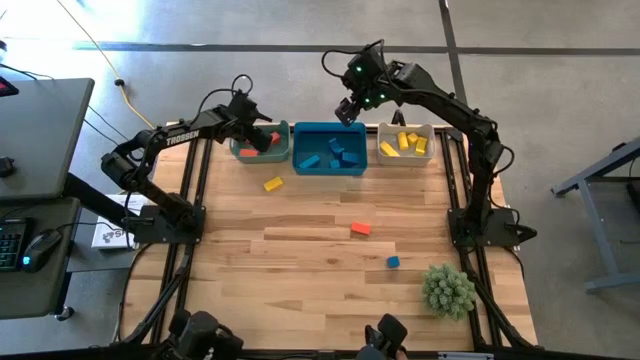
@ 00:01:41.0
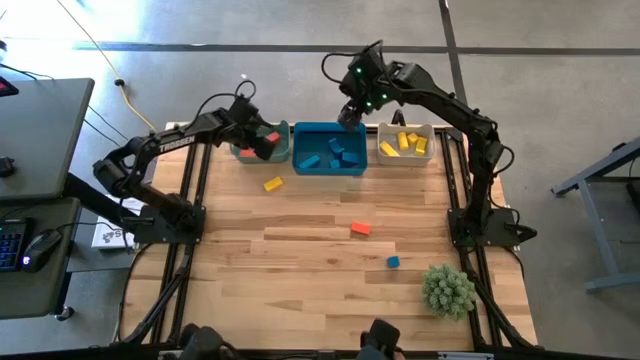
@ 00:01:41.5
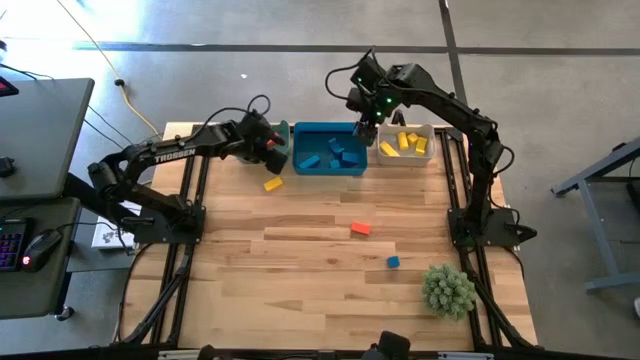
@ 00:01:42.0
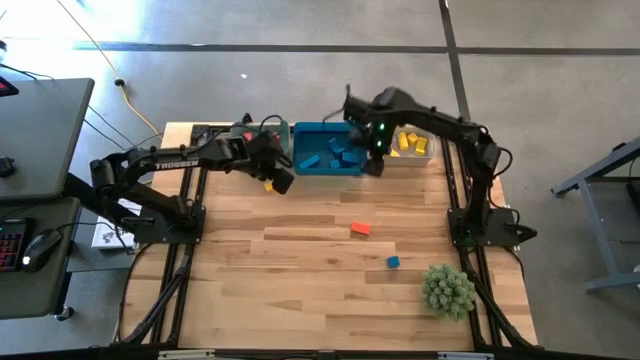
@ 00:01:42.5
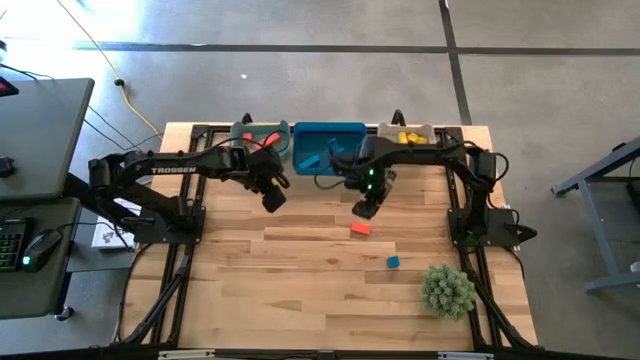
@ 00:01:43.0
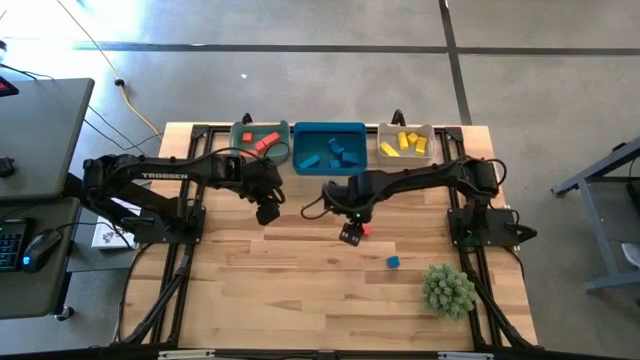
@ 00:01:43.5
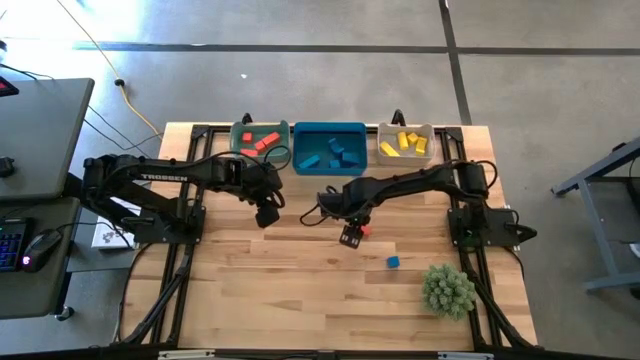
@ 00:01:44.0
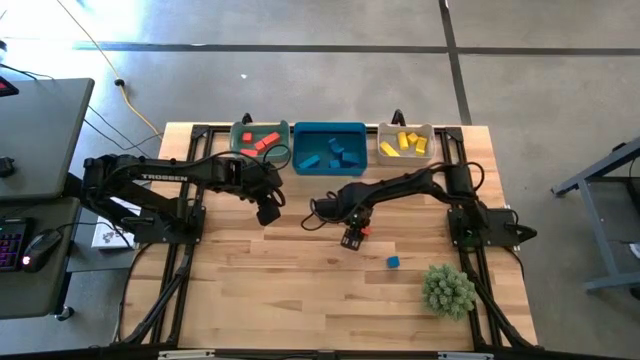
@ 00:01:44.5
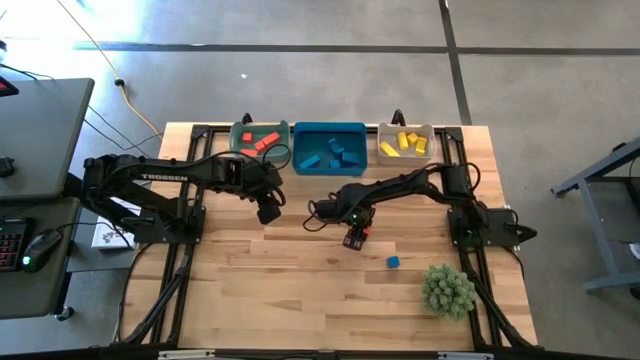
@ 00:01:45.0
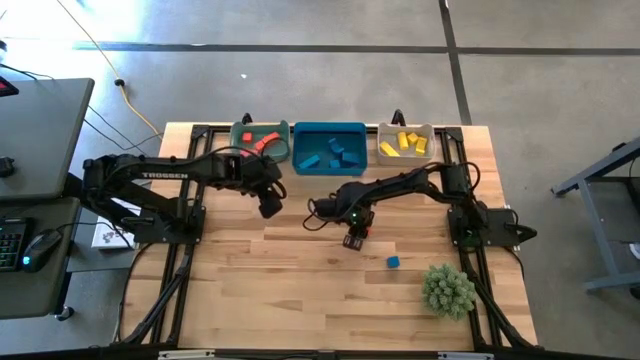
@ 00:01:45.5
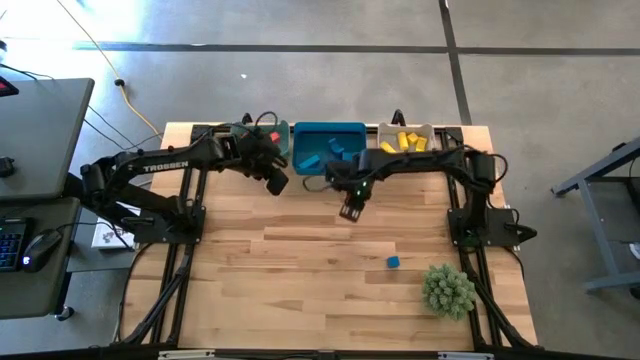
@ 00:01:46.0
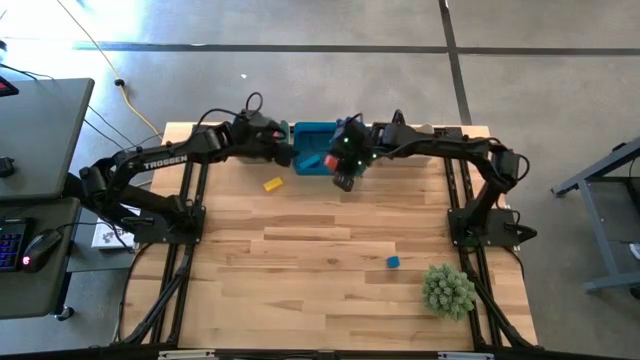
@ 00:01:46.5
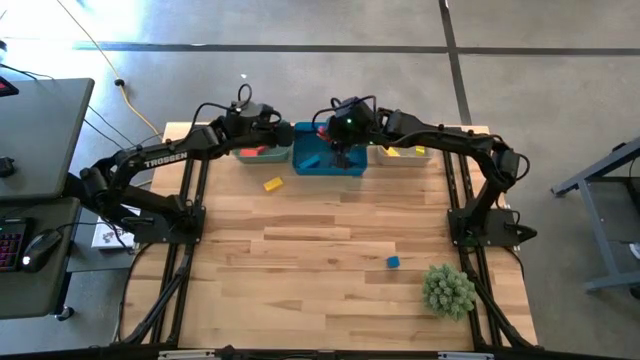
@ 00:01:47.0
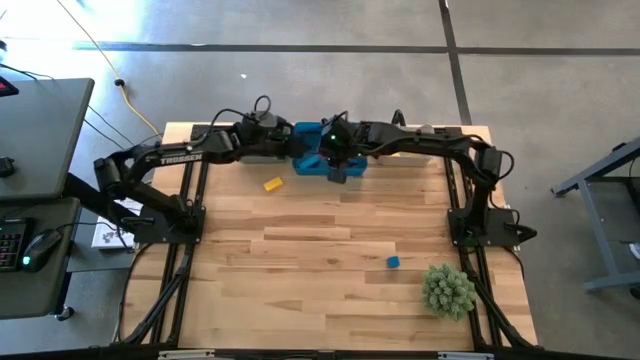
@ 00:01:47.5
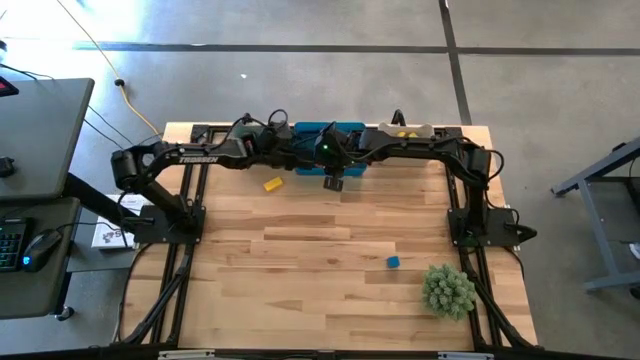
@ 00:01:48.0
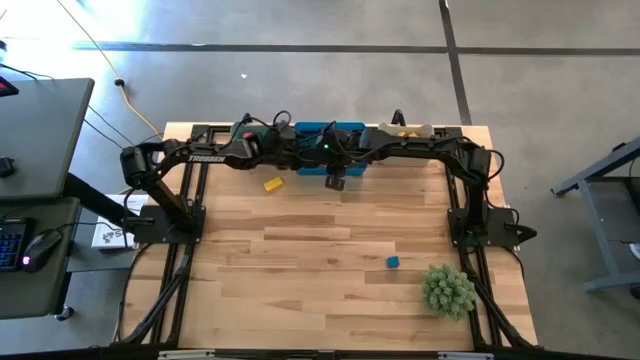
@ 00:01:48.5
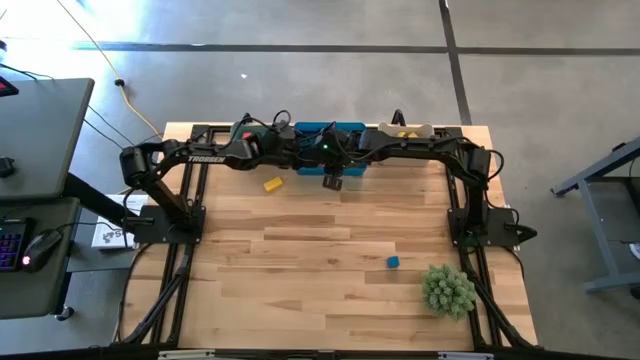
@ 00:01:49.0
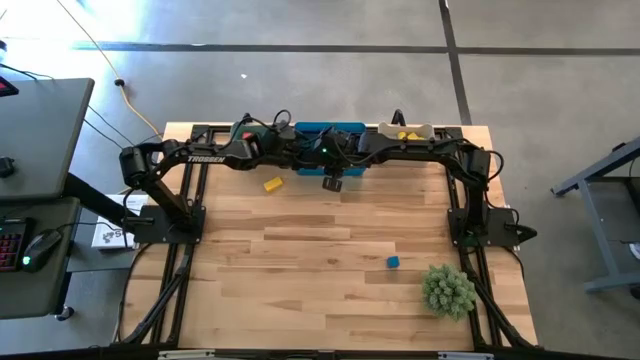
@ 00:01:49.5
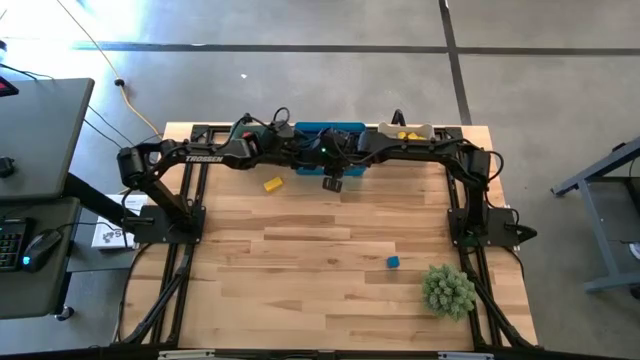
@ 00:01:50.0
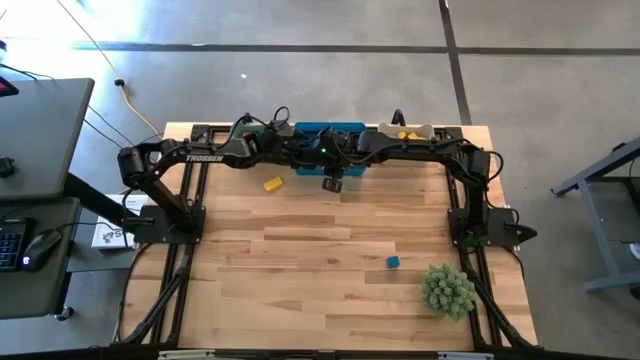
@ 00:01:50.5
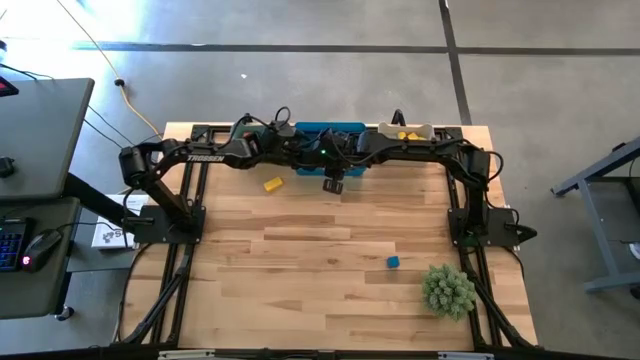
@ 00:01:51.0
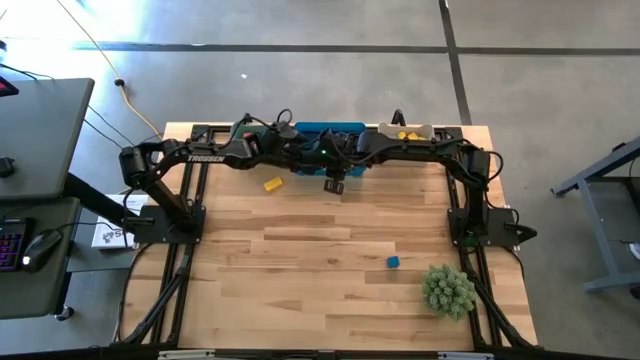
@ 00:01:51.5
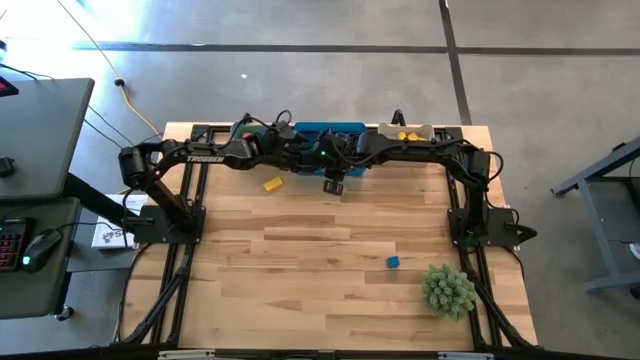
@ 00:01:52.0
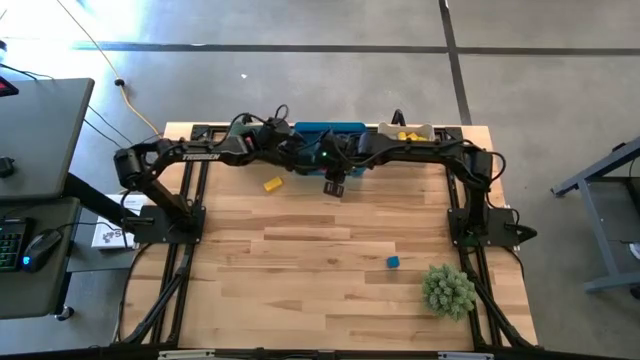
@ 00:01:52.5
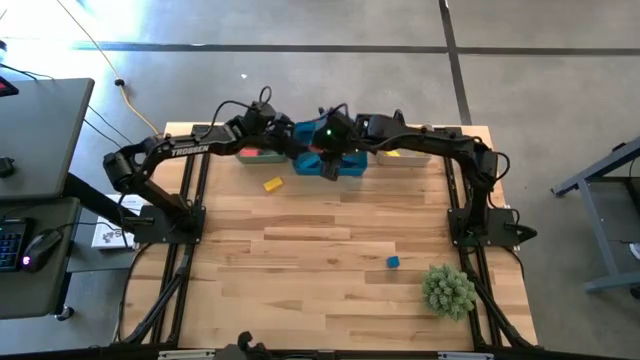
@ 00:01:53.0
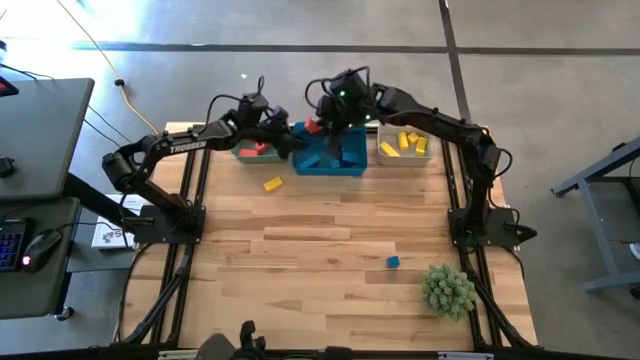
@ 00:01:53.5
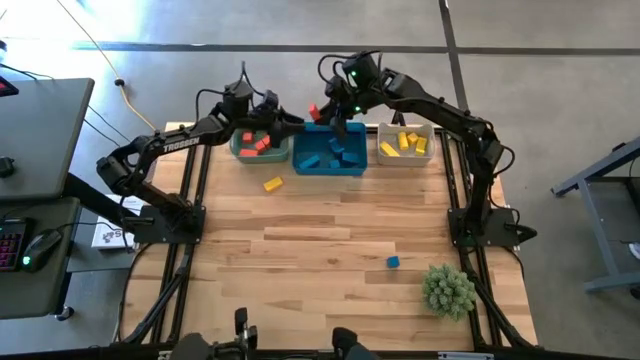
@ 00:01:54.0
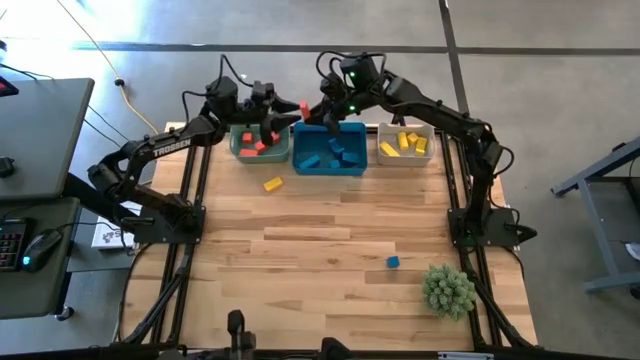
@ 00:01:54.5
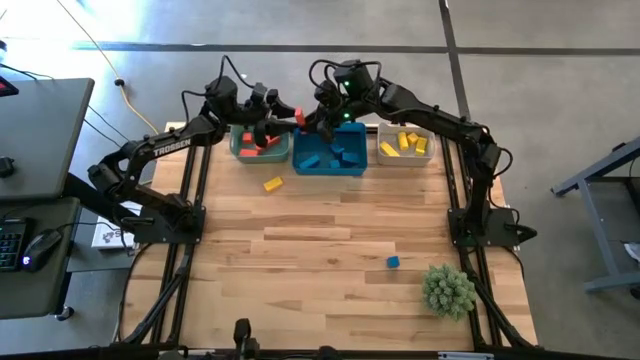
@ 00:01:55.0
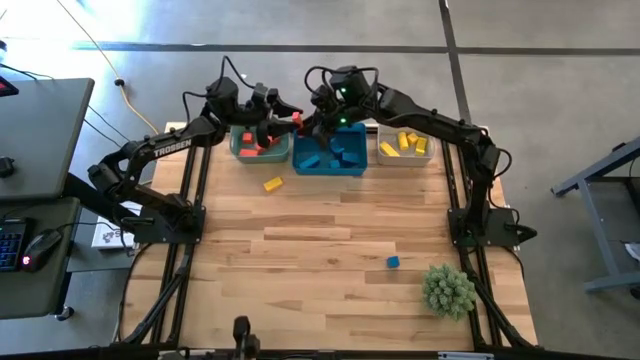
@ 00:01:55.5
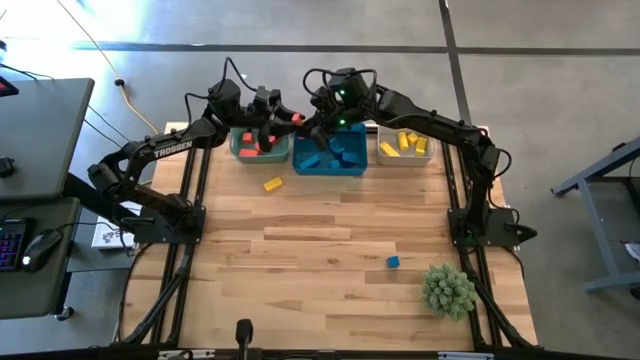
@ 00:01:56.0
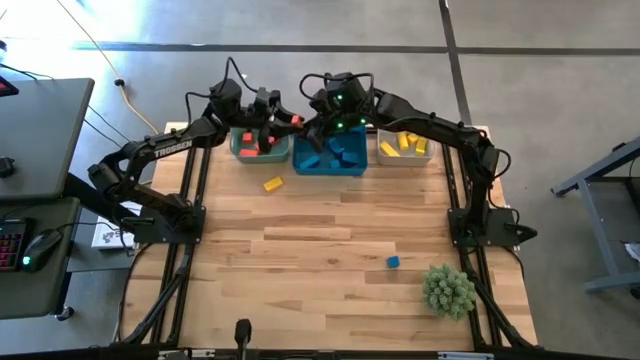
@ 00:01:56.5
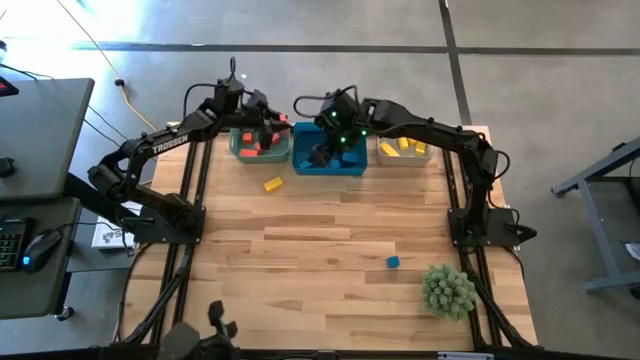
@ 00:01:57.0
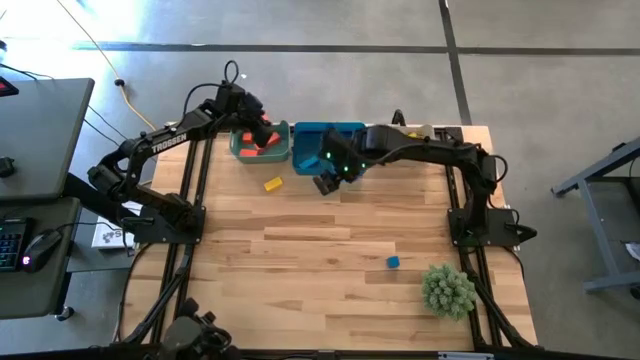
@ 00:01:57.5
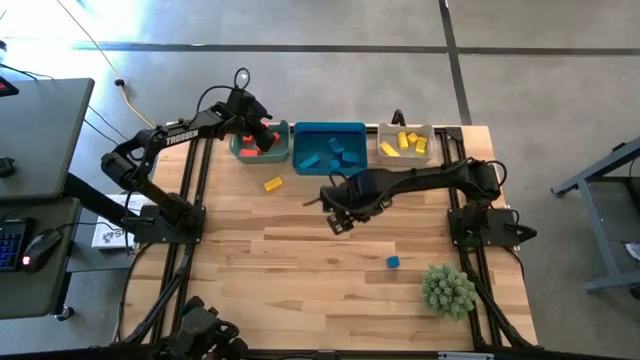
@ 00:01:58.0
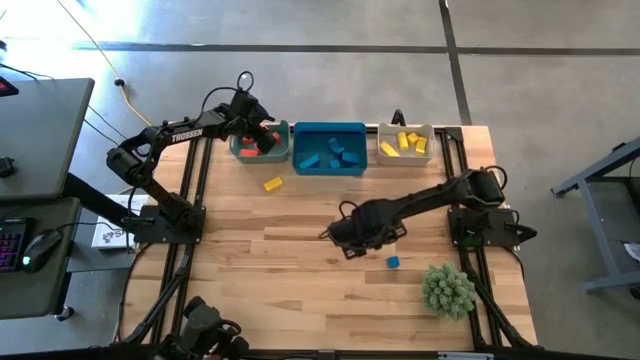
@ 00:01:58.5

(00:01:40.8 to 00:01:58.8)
Task: Sort & place blocks by color
Put the orange block into the green bin

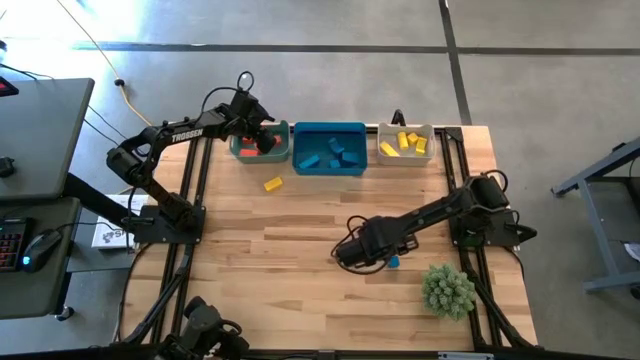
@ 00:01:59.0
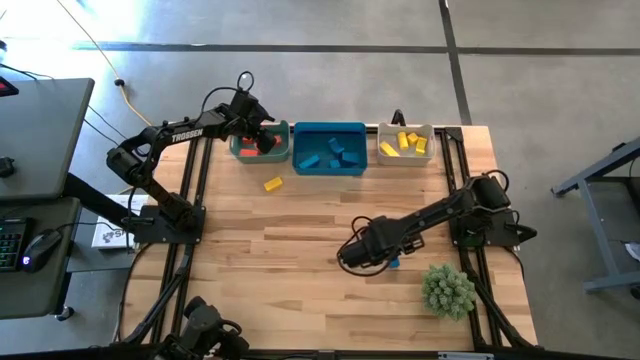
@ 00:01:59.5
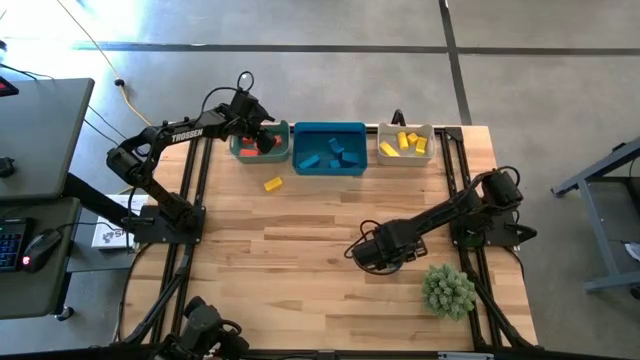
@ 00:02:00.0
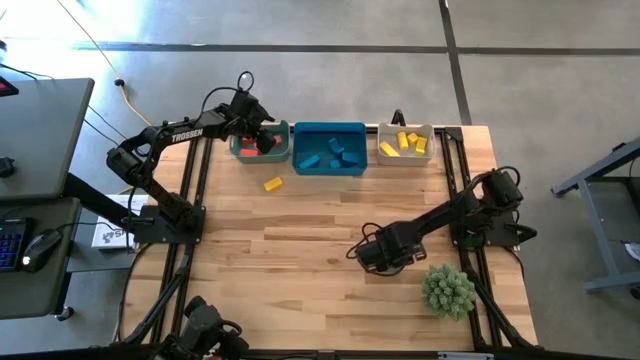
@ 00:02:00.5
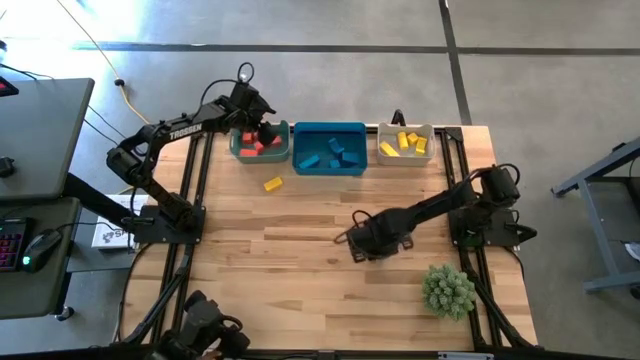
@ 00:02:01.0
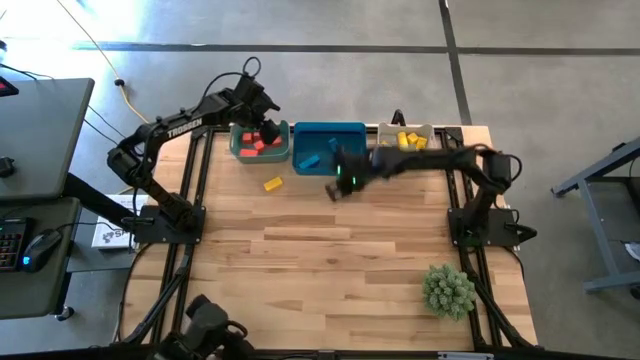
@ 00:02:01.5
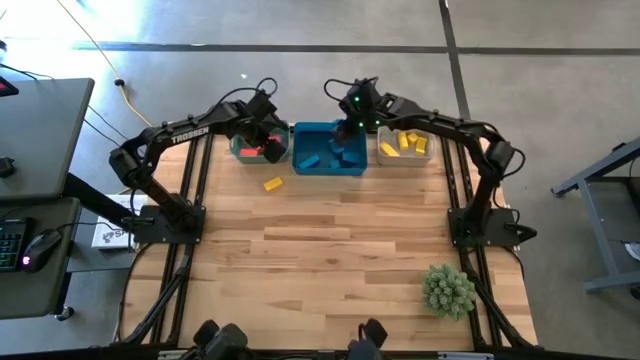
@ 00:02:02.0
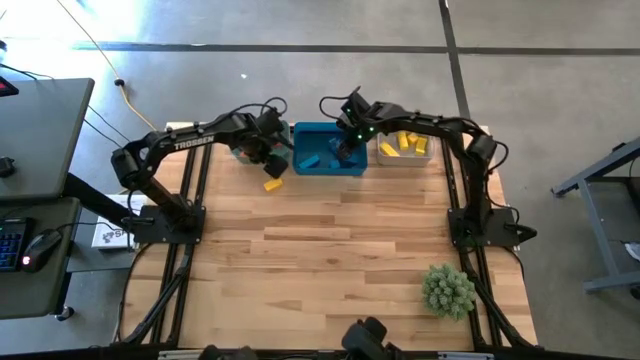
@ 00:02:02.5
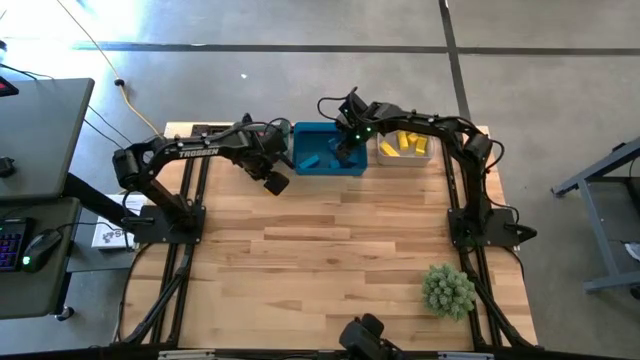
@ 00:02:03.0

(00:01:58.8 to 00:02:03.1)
Put the blue block into the blue bin
